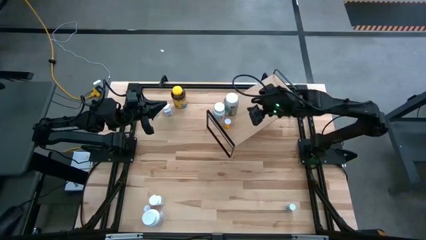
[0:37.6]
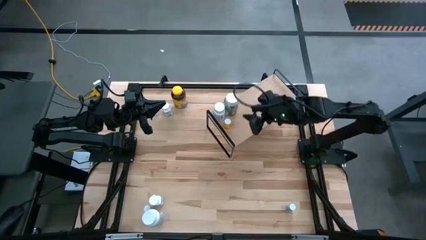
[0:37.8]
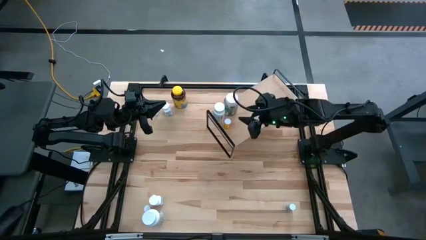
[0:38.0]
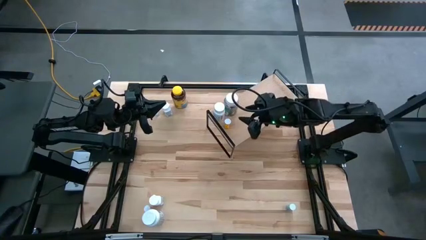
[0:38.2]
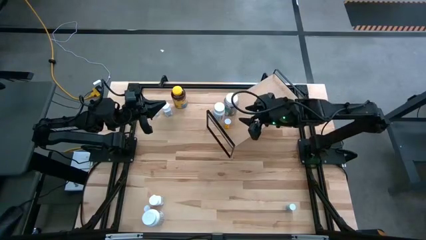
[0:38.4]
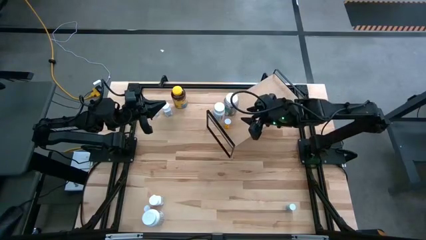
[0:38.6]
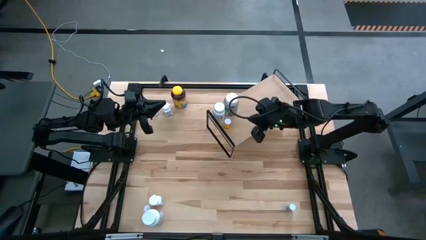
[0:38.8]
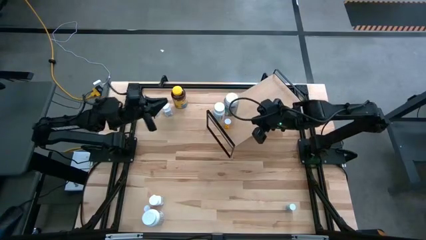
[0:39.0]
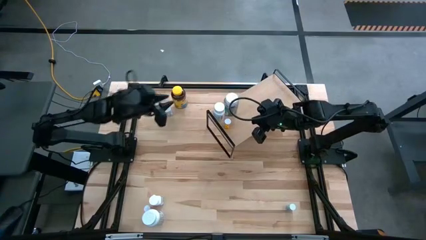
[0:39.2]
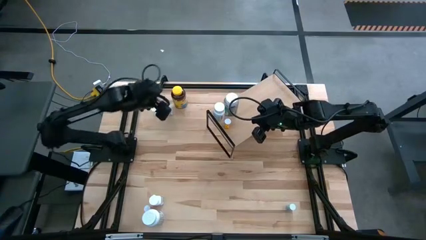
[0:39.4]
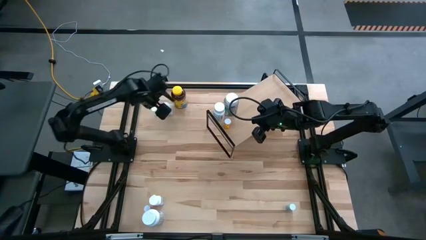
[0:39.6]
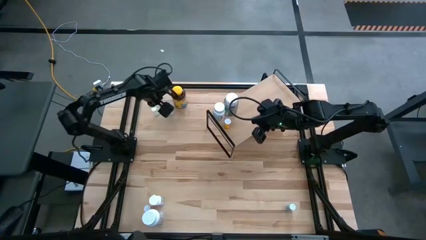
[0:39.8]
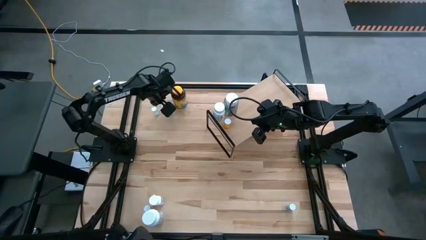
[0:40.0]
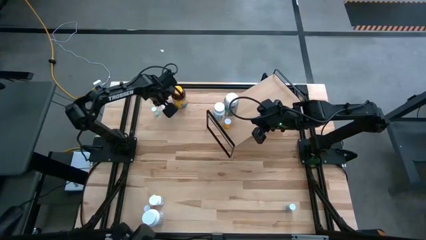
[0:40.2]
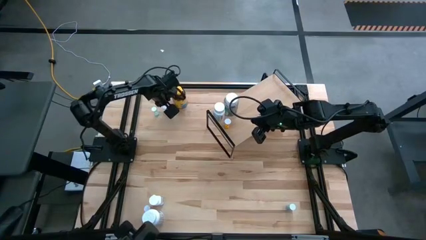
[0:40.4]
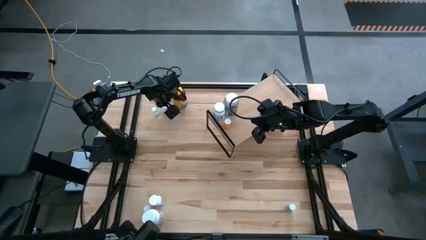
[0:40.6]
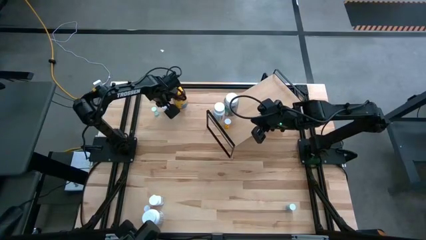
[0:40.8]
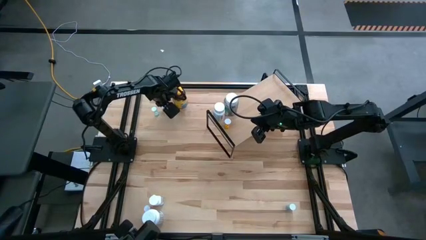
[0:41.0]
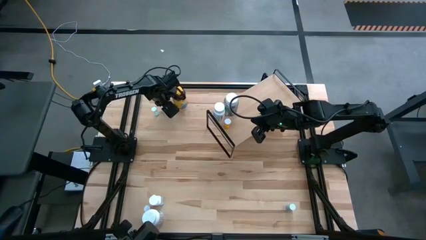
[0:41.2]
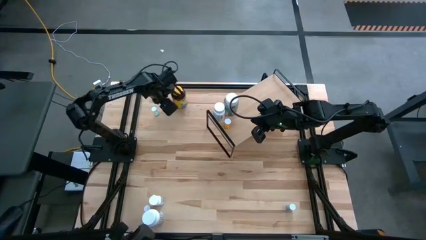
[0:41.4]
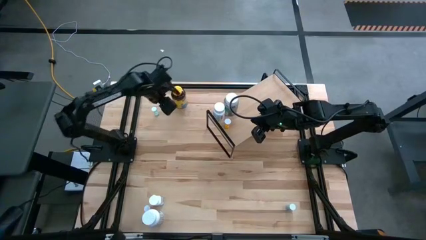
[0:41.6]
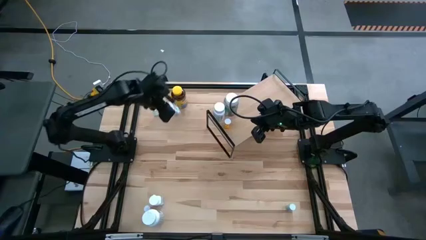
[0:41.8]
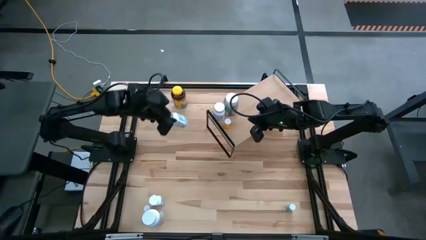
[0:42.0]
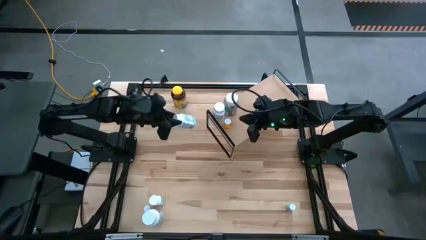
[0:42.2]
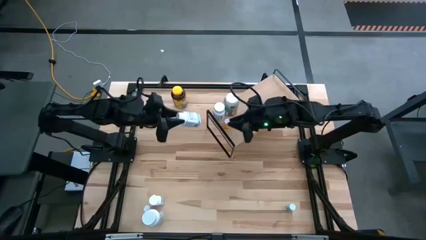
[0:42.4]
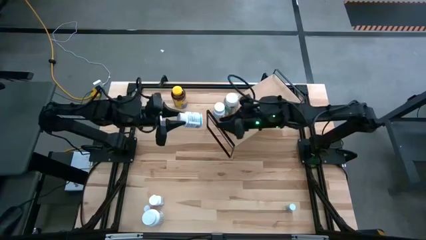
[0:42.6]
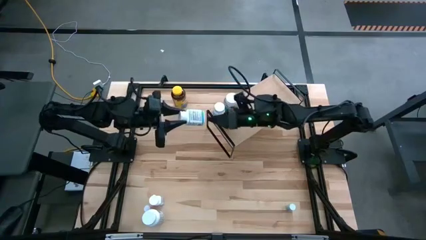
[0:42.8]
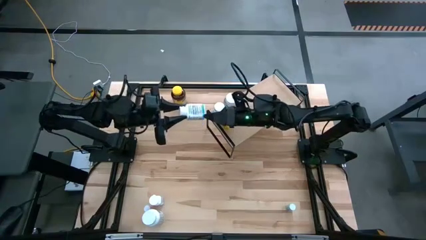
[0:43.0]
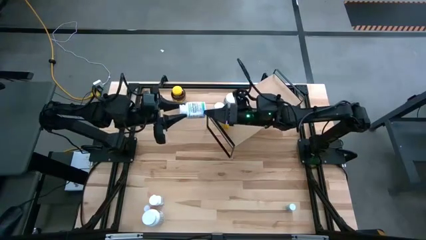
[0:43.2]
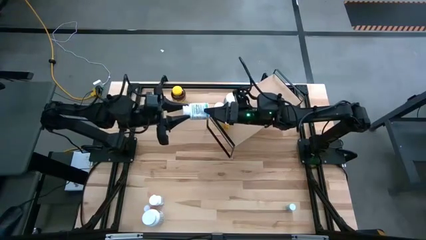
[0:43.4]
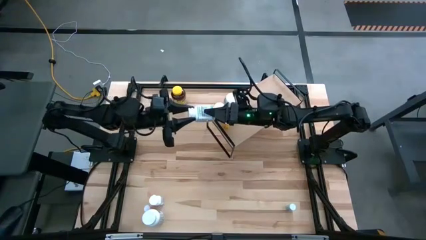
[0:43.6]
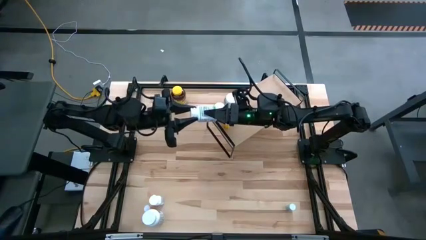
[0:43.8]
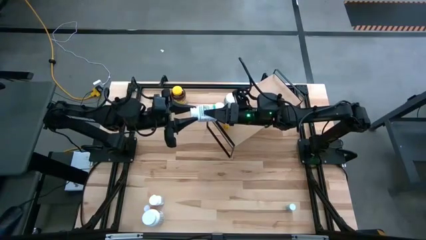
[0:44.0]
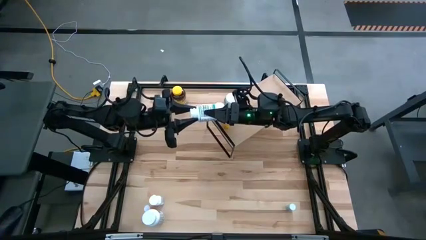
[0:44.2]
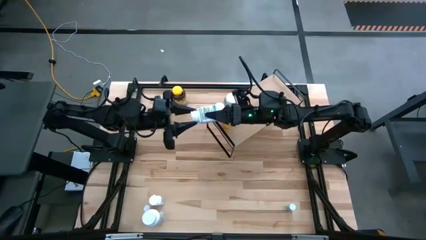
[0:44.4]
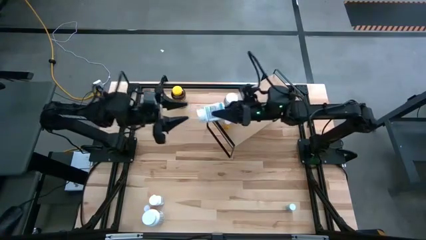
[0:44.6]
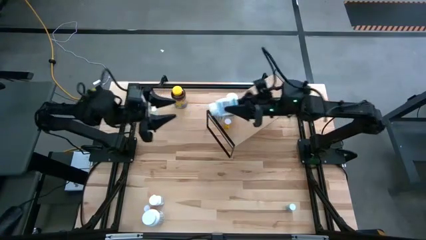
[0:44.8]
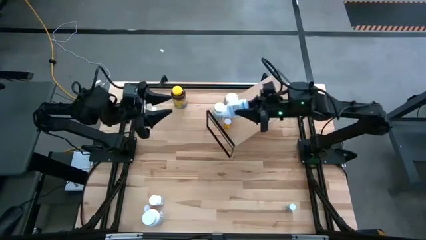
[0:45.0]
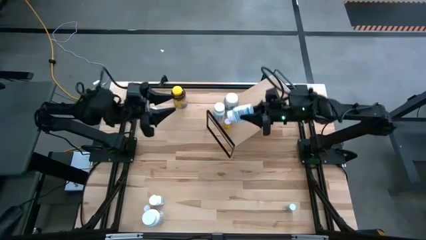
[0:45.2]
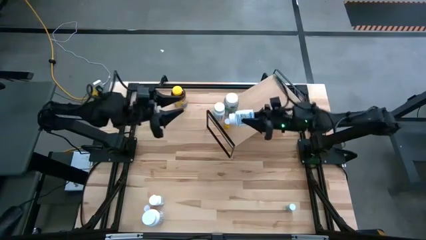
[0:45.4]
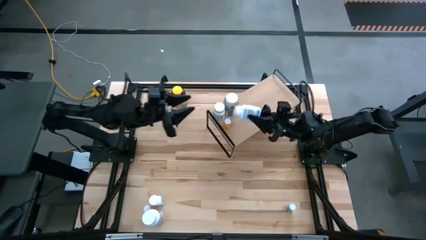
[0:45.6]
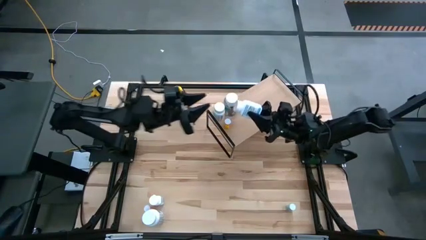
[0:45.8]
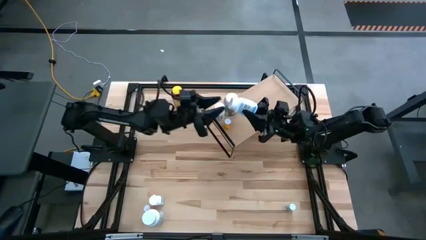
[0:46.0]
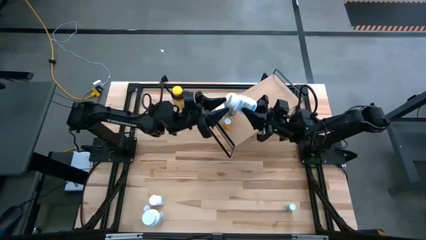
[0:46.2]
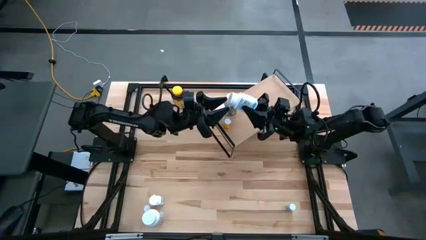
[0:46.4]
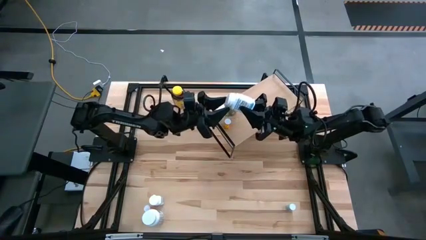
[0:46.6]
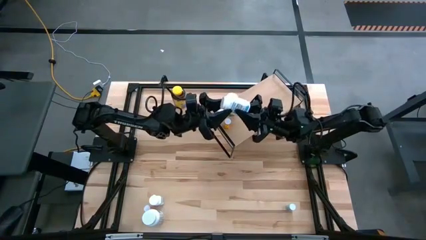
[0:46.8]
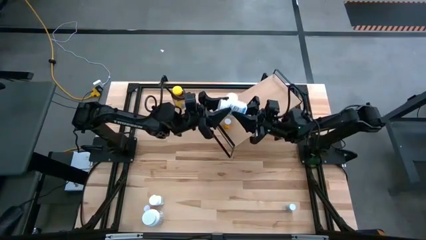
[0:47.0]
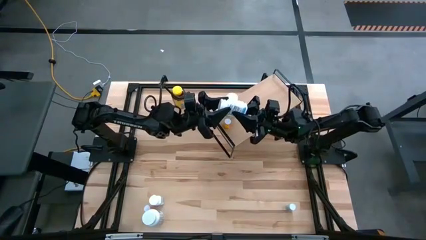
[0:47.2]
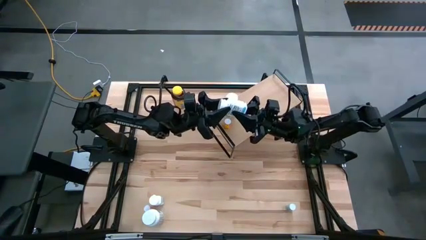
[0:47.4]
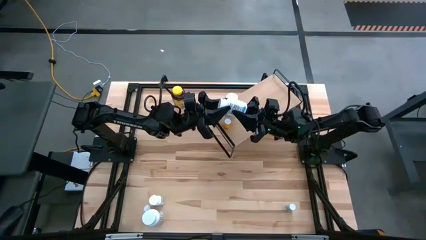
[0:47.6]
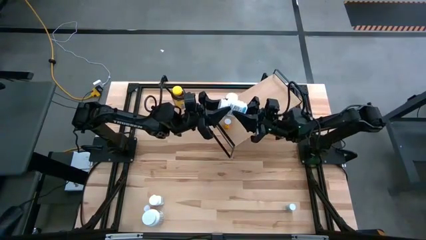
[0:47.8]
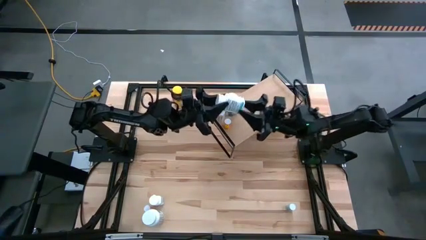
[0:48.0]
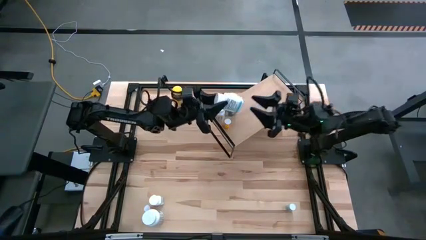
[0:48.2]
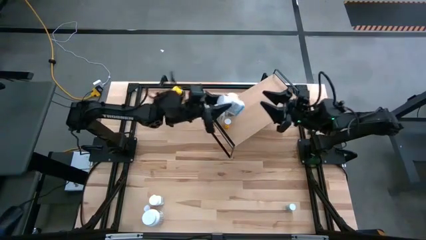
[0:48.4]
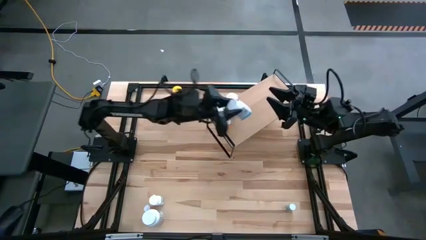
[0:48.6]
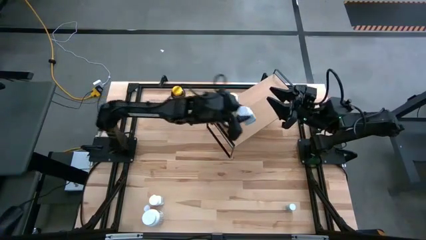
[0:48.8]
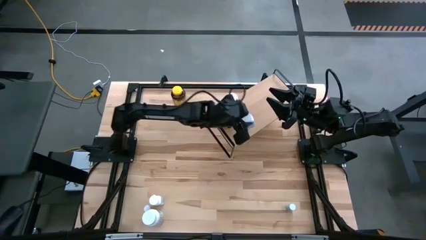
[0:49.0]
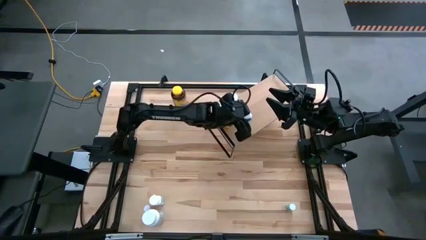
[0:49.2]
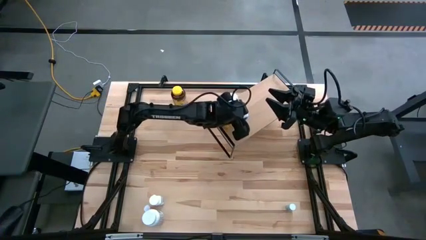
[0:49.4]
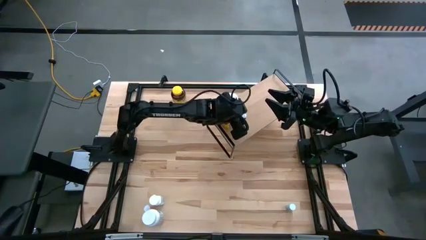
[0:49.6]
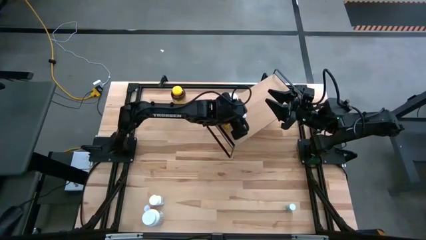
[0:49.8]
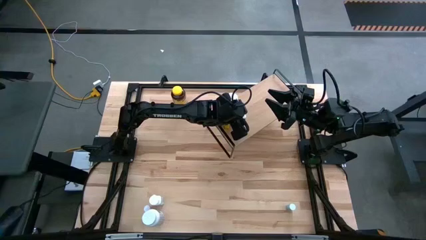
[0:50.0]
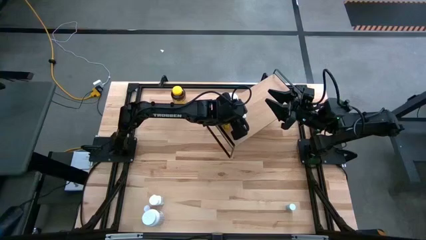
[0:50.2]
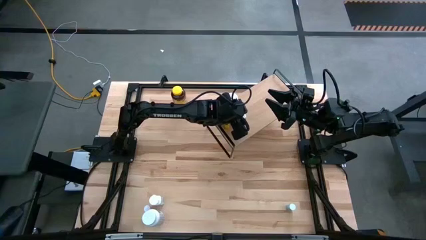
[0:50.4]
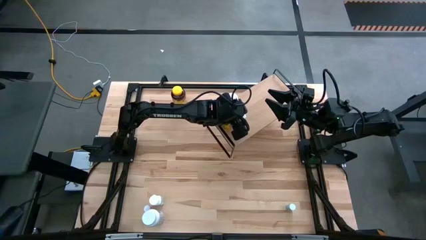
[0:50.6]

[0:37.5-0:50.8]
Task: Pick and place medicine bottles onto shelf by color
Put the small white pill bottle on the shelf

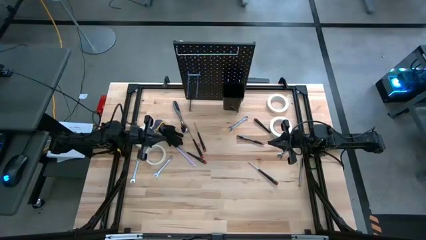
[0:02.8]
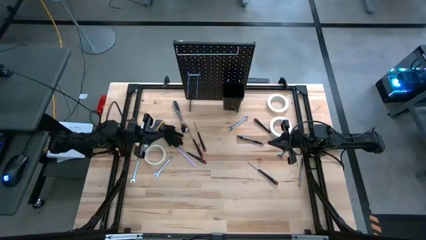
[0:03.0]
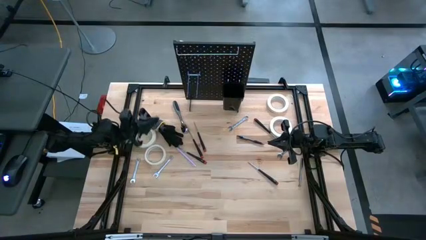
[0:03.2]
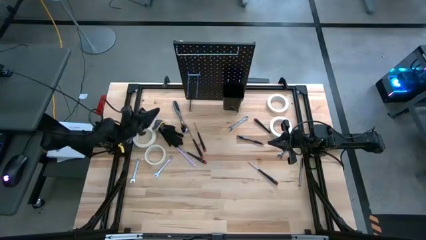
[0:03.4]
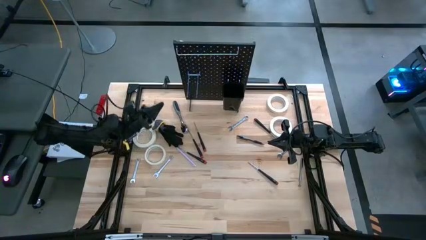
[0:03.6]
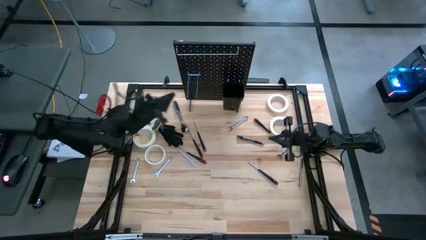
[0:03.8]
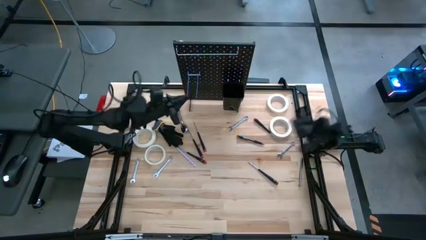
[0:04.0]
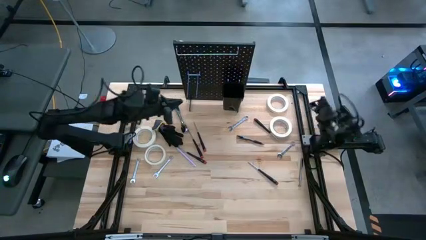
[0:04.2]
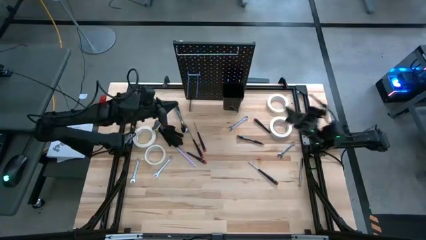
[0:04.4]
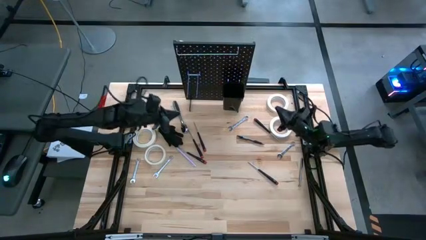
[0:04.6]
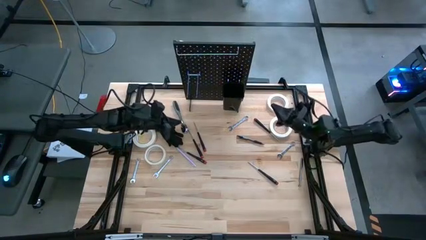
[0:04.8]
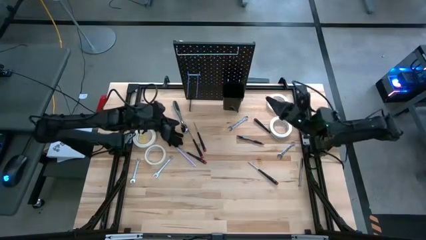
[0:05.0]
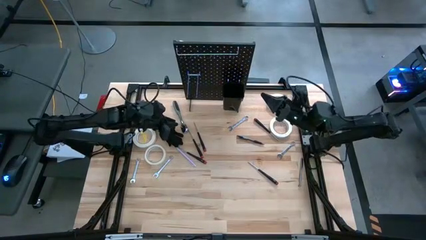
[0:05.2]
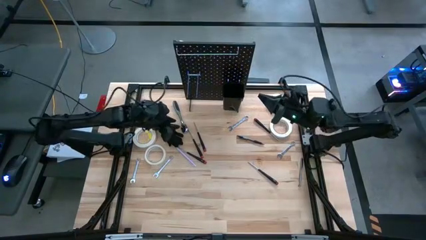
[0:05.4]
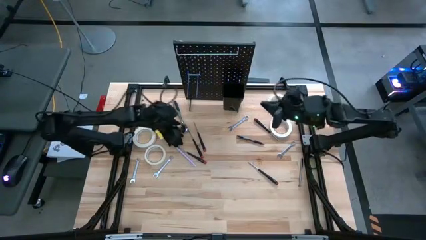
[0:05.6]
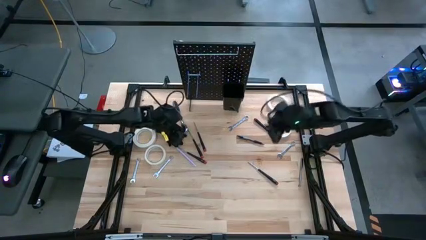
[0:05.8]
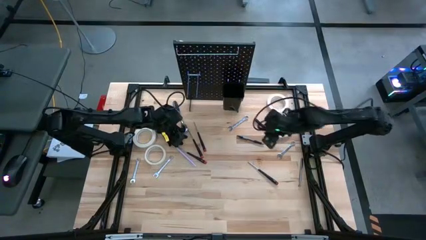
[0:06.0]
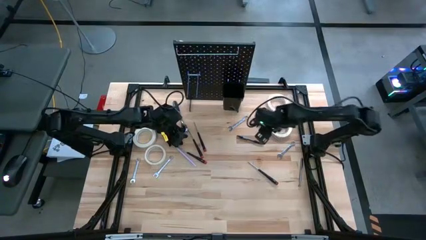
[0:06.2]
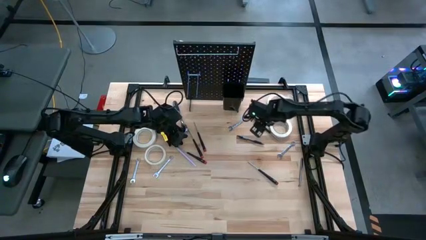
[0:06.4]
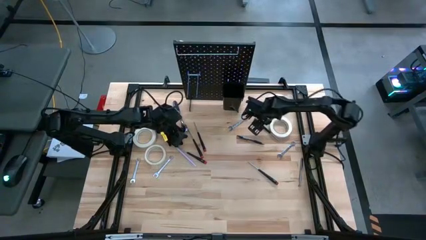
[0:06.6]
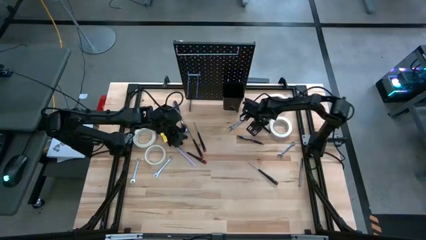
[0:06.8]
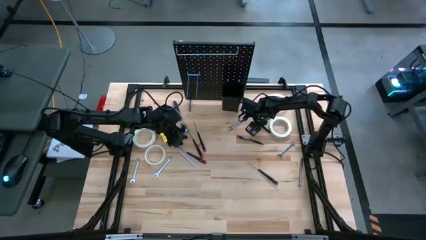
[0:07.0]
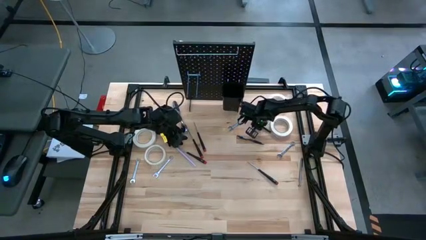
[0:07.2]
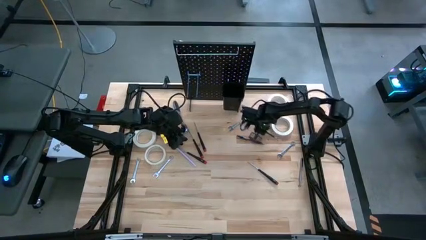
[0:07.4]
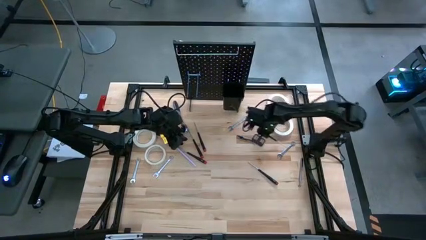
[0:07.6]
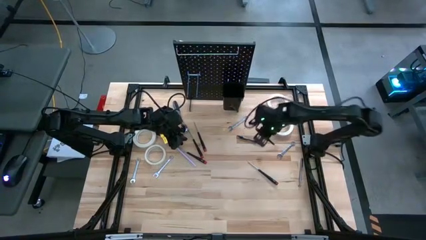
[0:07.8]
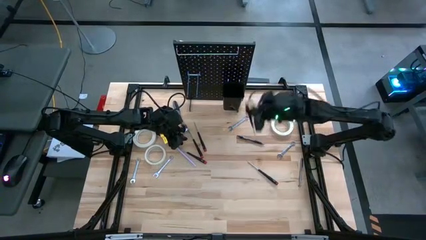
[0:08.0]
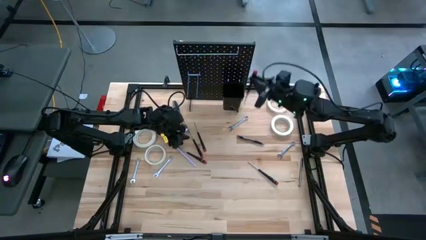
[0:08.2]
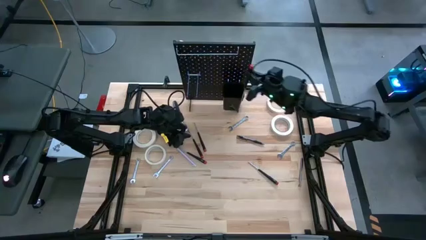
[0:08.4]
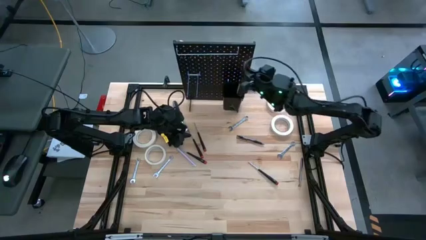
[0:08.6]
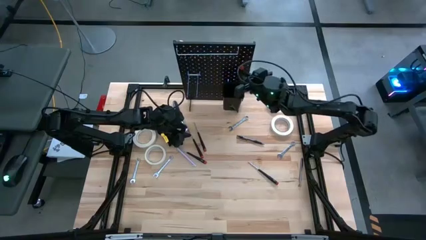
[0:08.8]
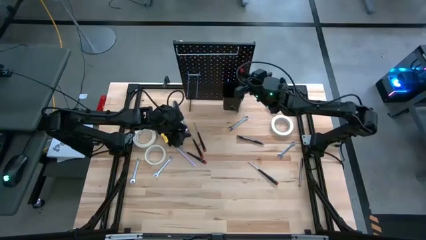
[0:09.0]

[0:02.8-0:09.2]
Task: Hang tools onto peg board
Put the nut driver into the black bin on the pegboard
